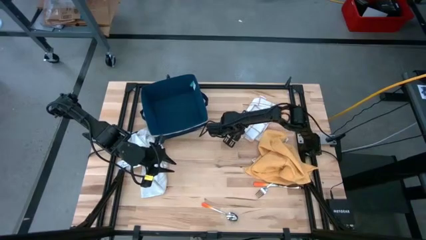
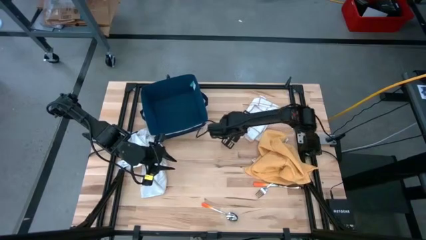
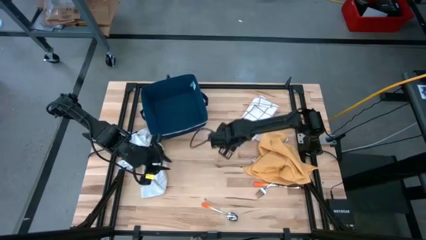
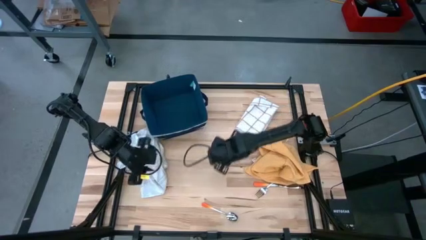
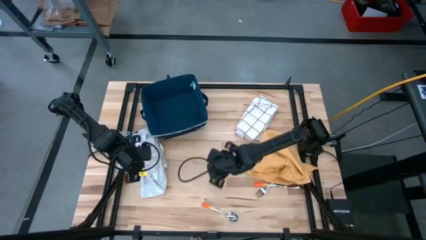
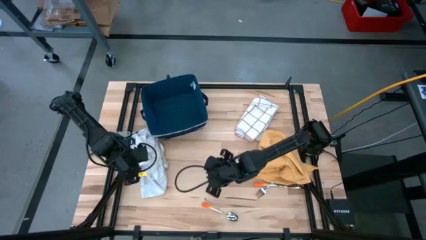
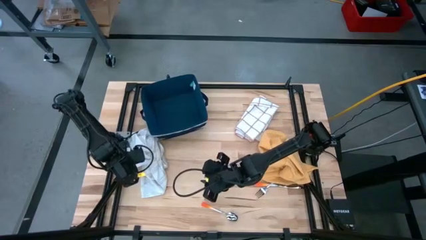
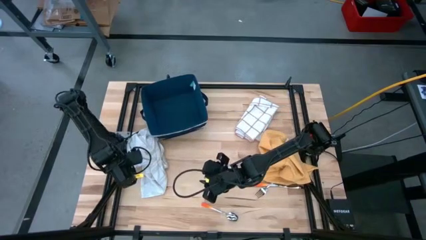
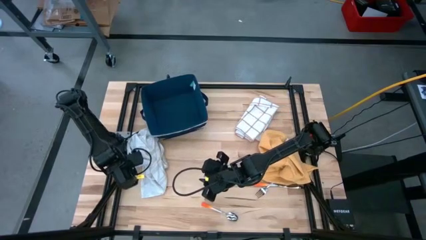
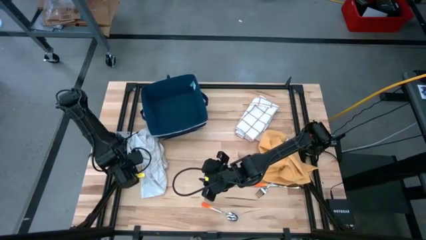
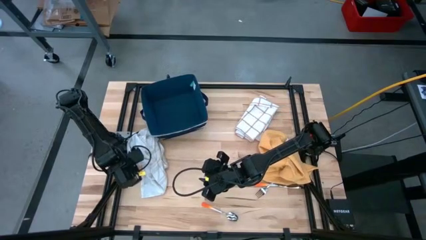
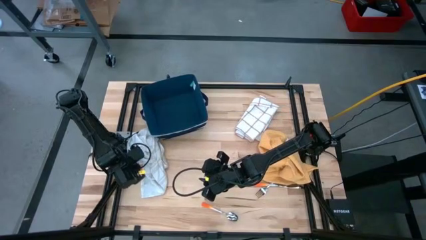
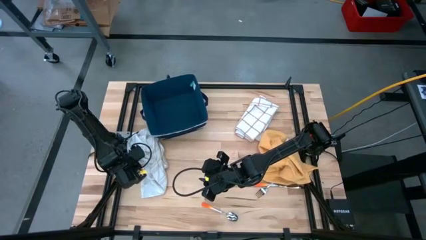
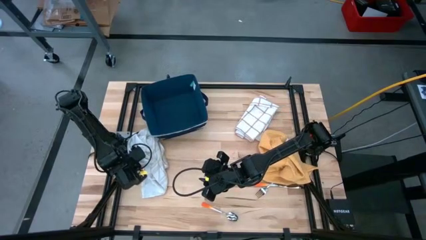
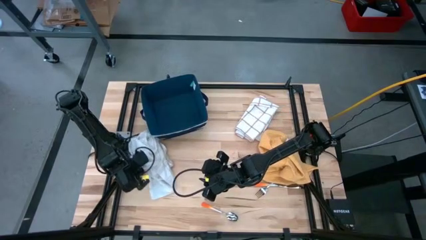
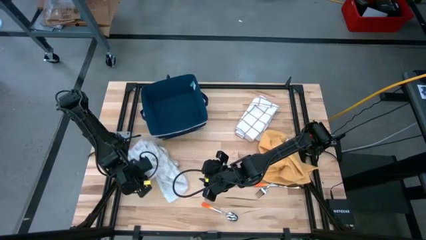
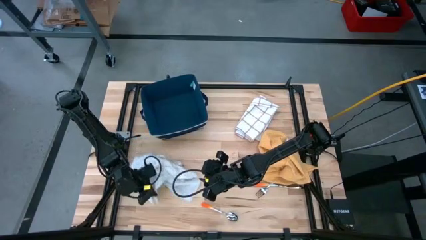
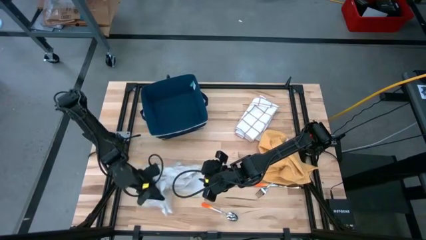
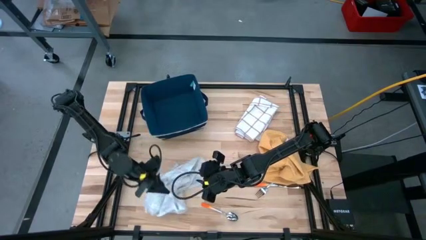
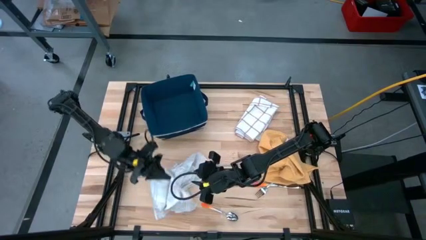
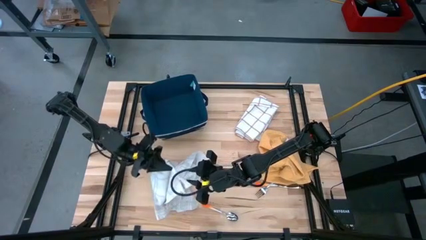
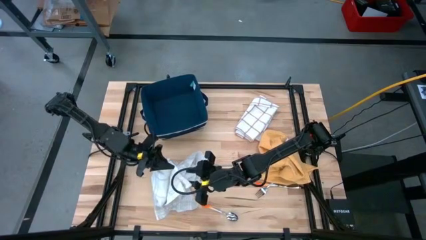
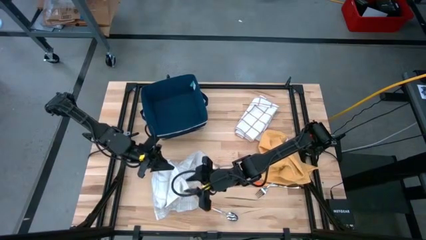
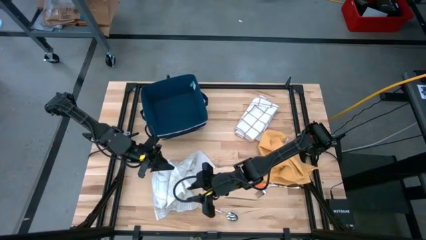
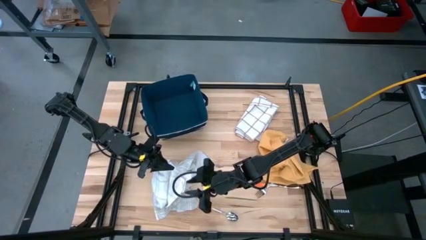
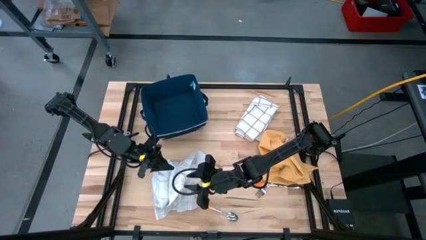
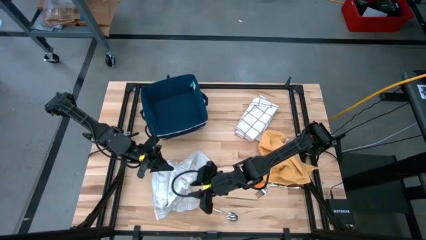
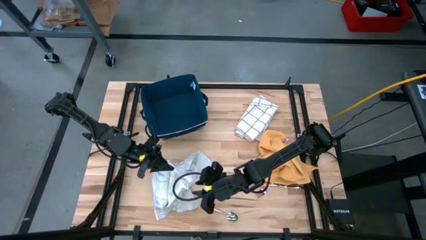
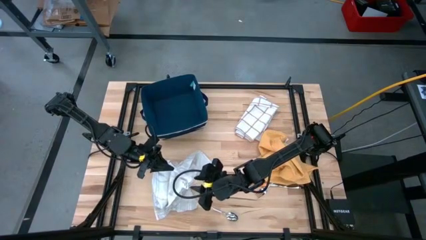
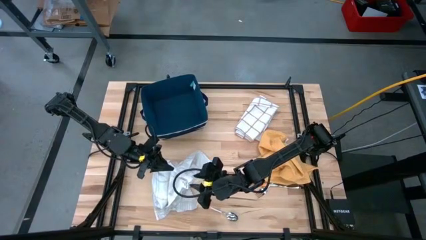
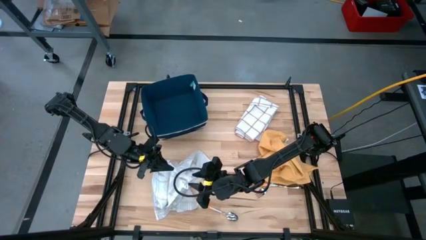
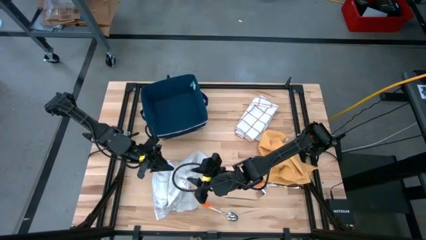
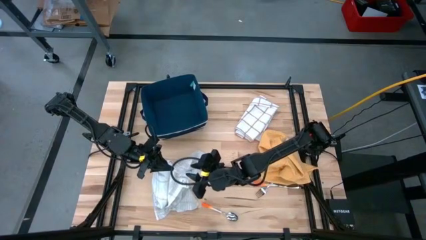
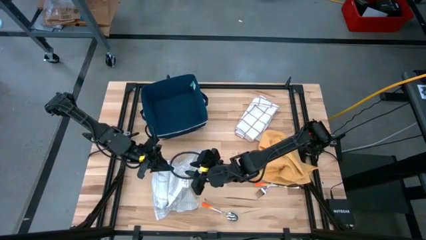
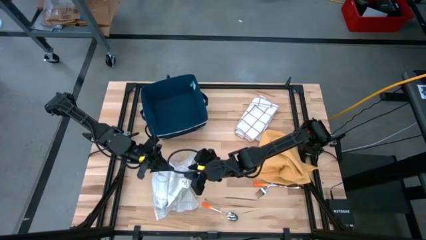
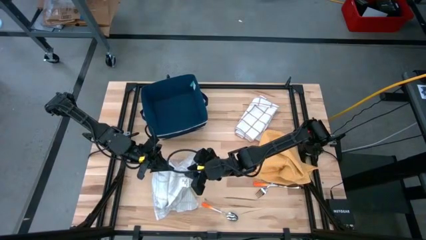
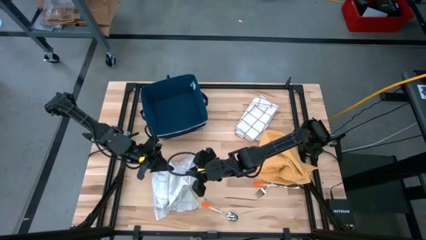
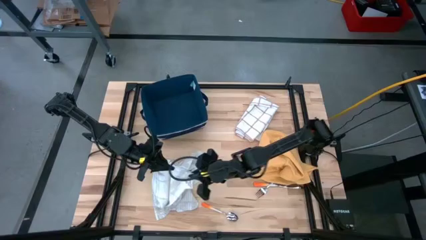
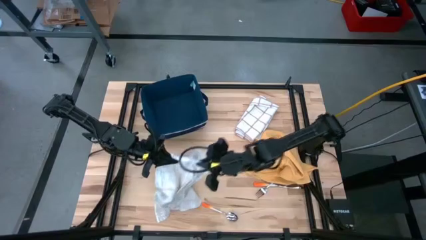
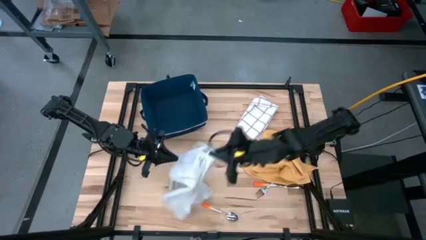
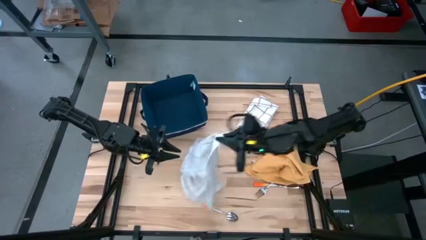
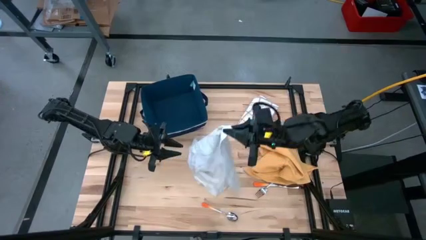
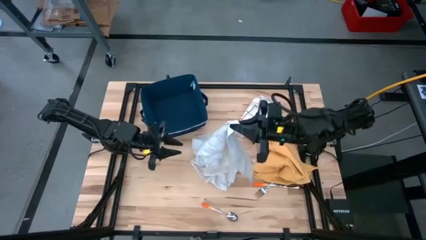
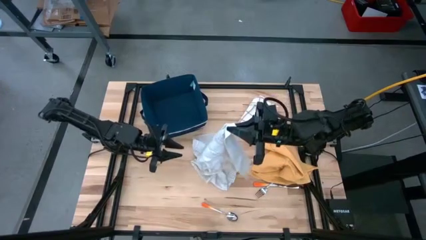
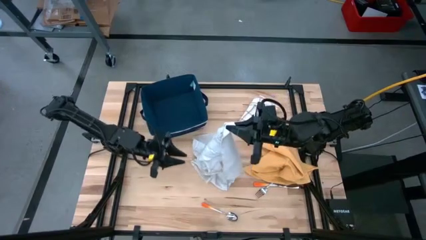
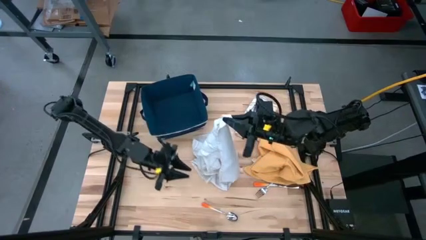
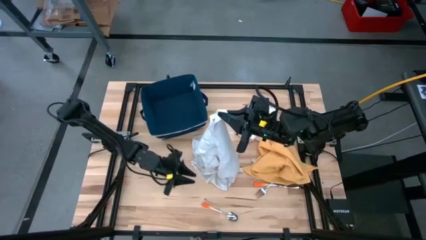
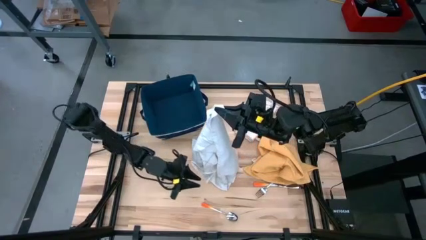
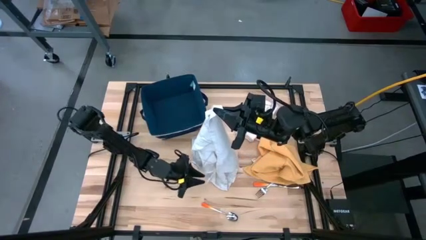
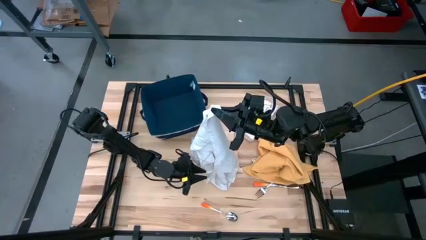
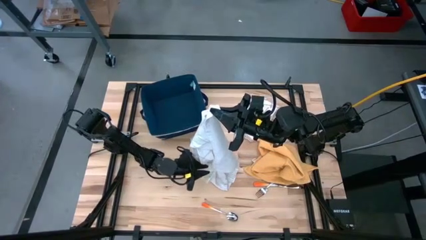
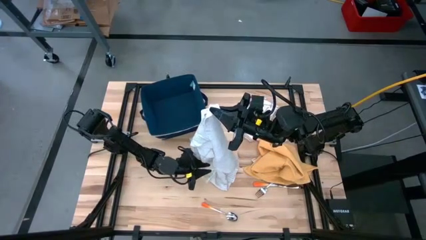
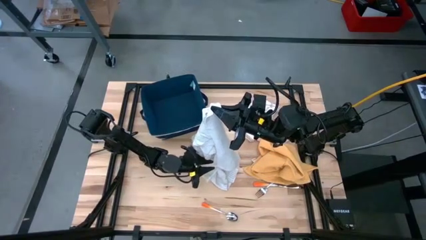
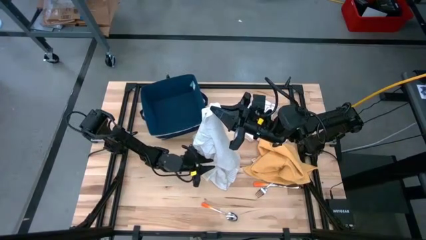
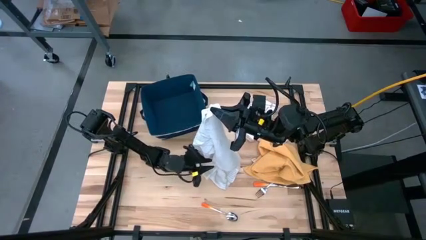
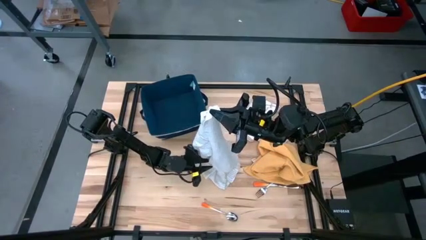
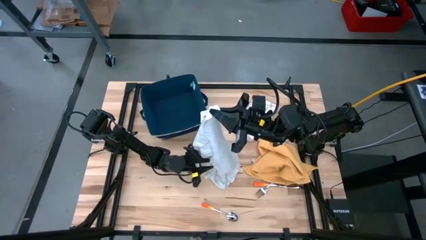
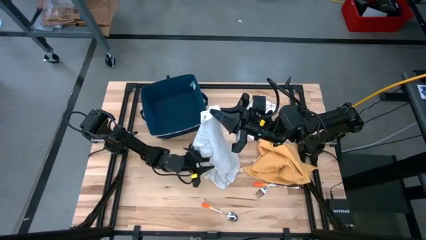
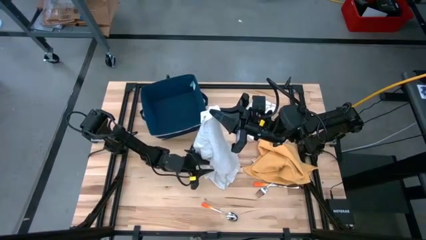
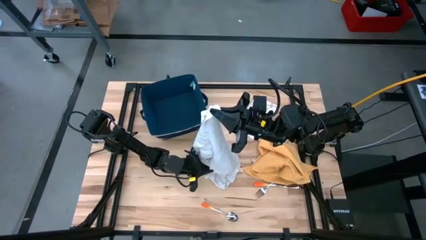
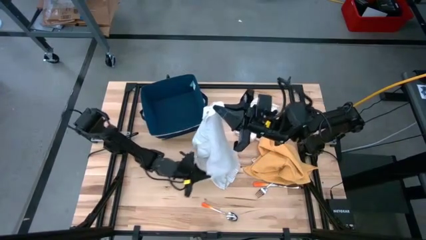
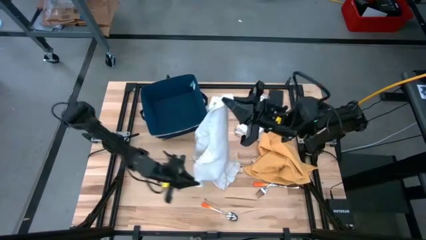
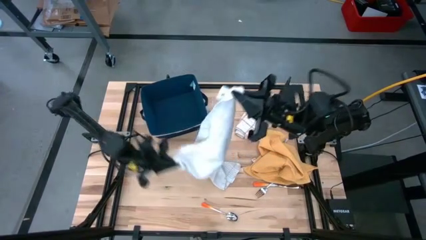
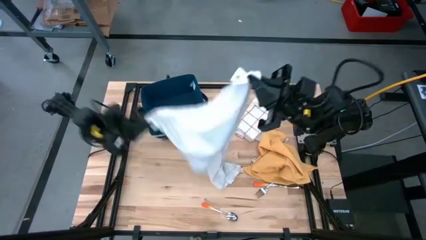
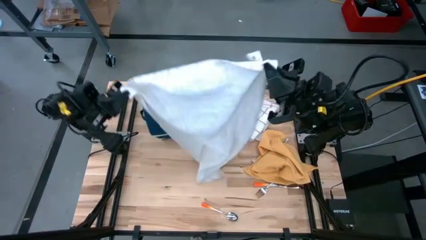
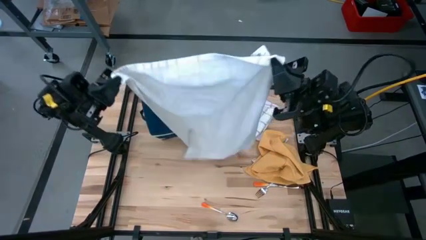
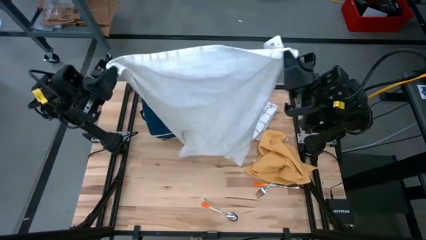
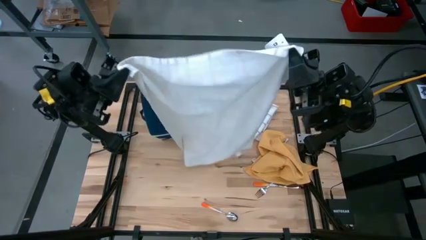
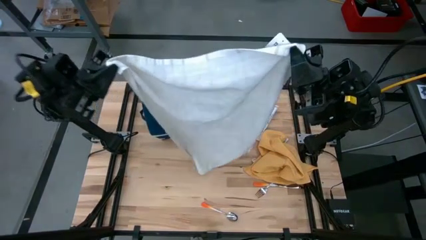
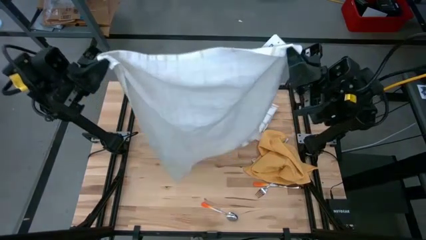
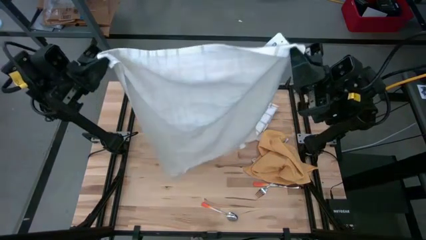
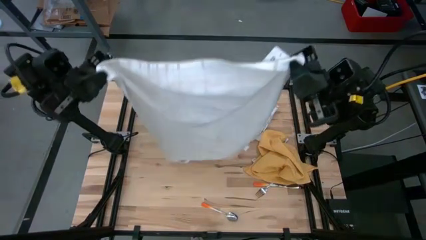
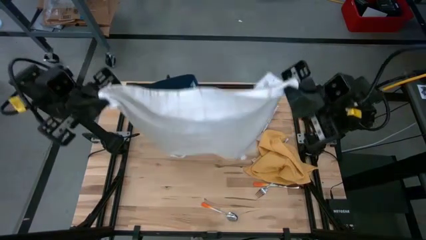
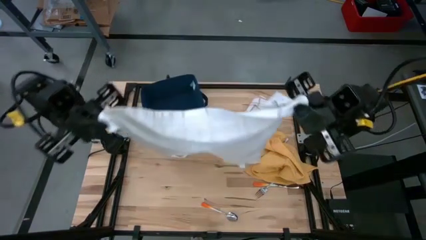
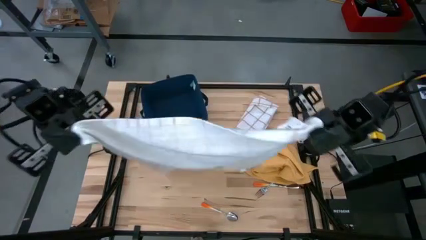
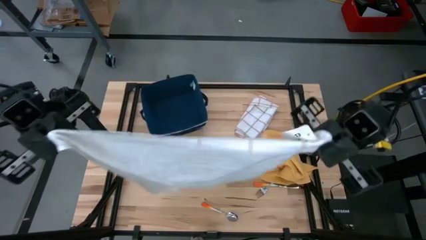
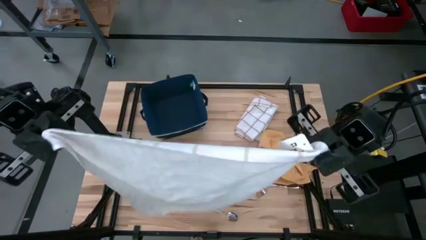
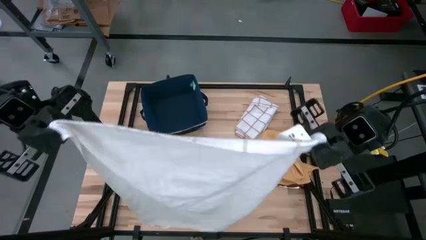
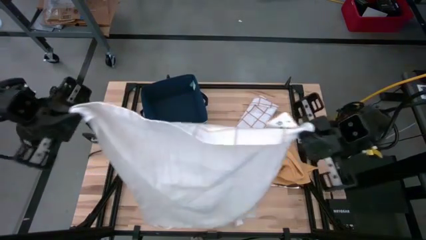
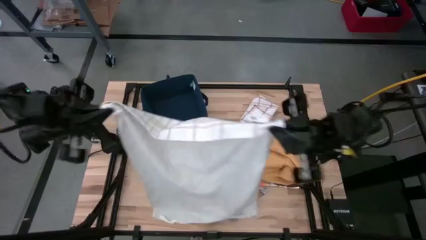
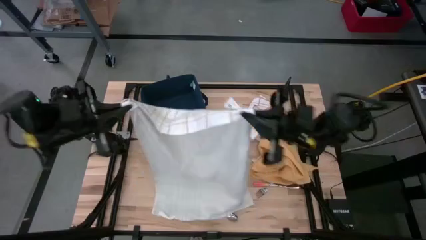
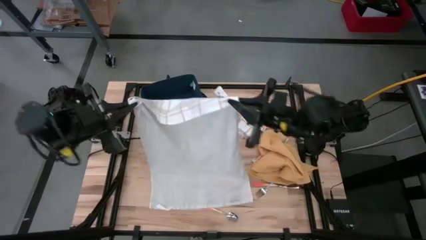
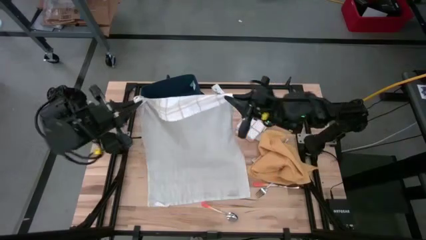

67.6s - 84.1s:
Task: Fold towel
Fold the left white patterned towel
